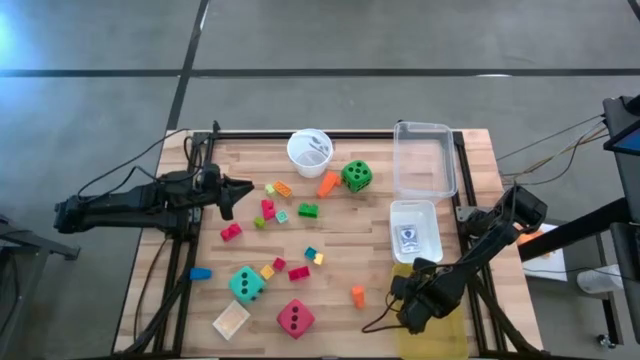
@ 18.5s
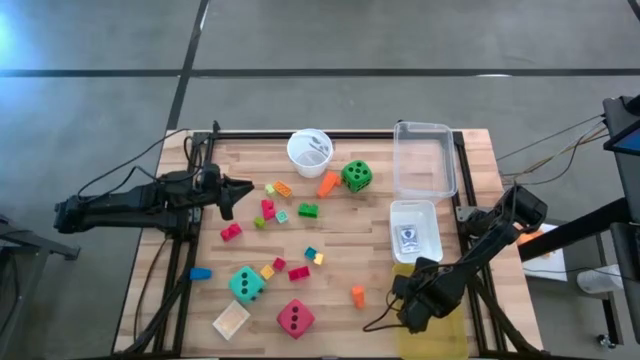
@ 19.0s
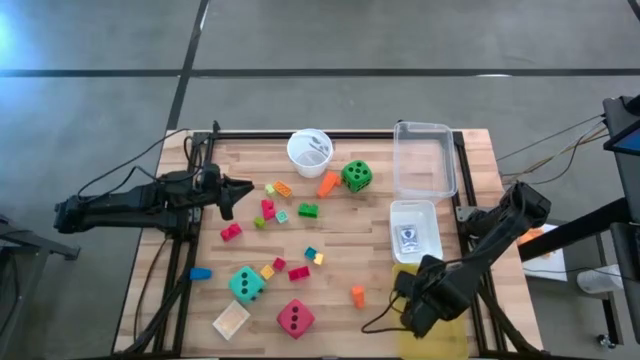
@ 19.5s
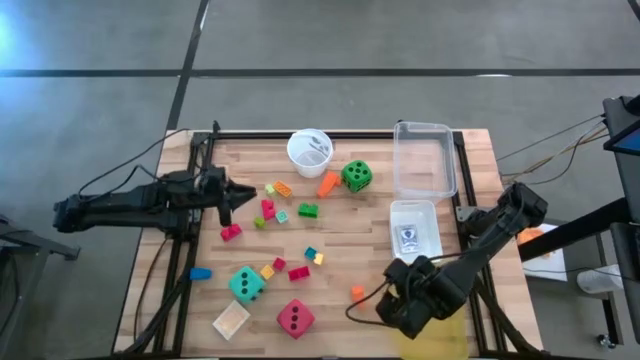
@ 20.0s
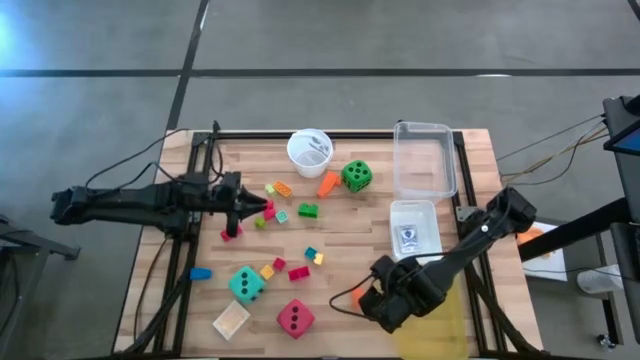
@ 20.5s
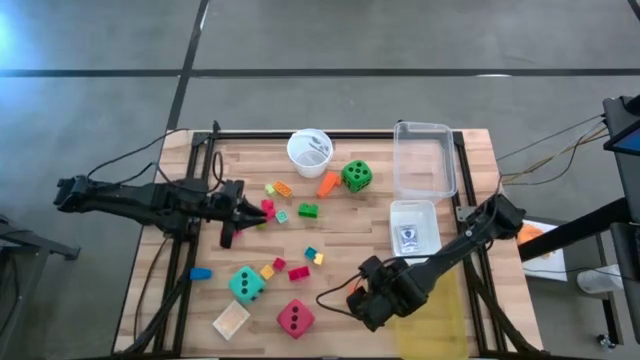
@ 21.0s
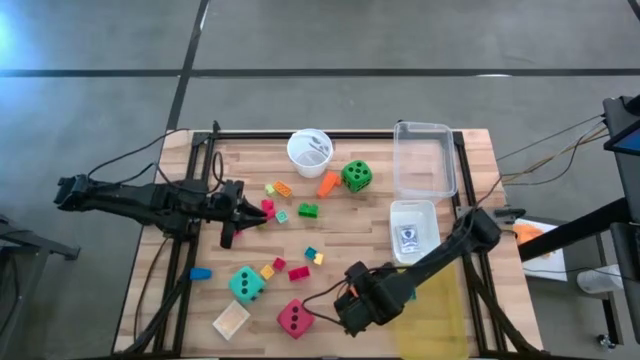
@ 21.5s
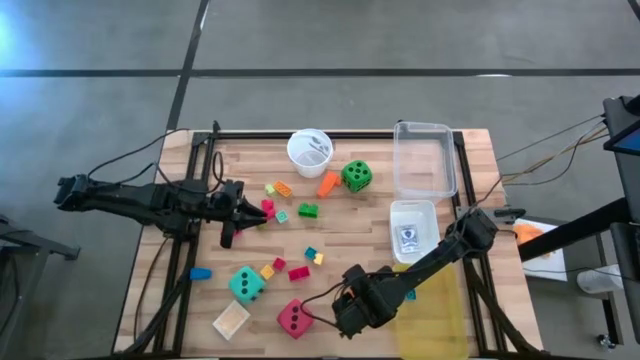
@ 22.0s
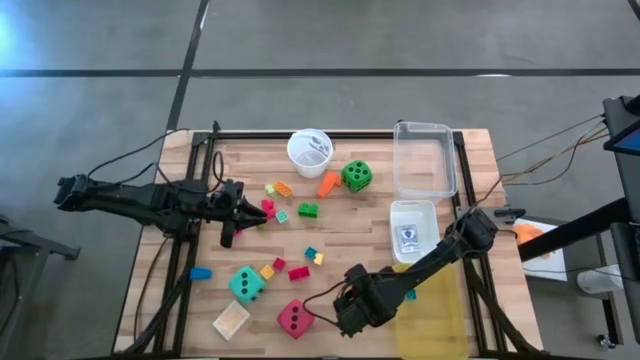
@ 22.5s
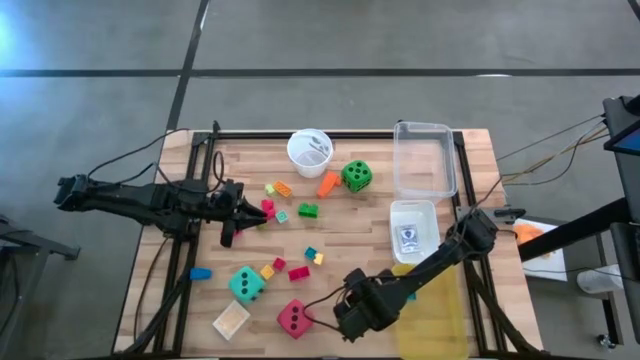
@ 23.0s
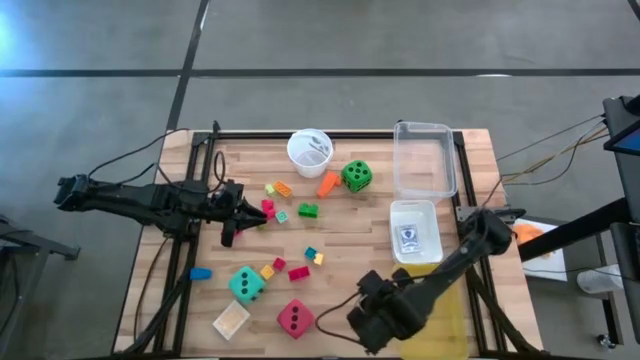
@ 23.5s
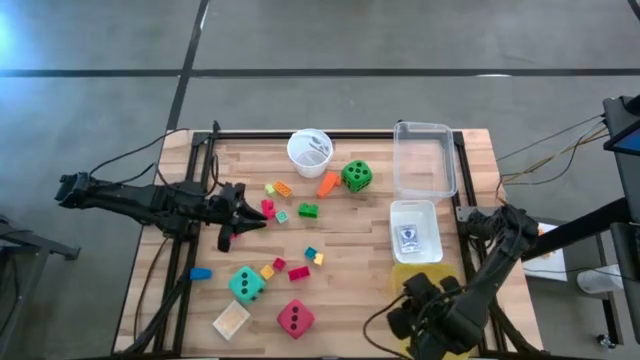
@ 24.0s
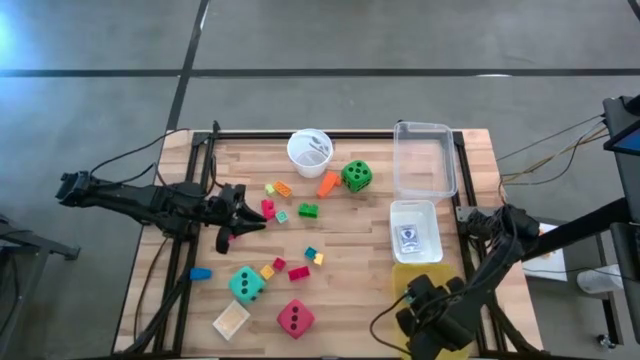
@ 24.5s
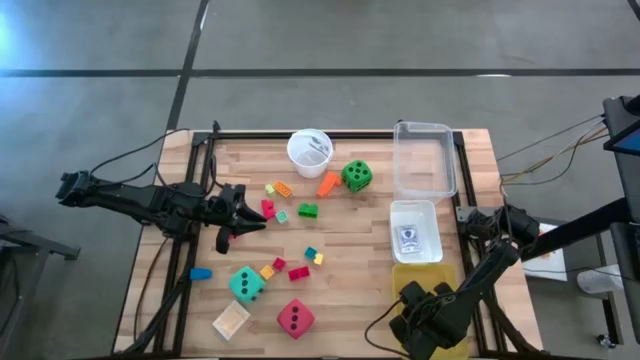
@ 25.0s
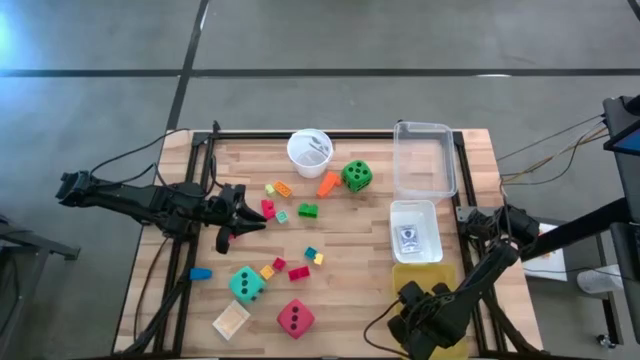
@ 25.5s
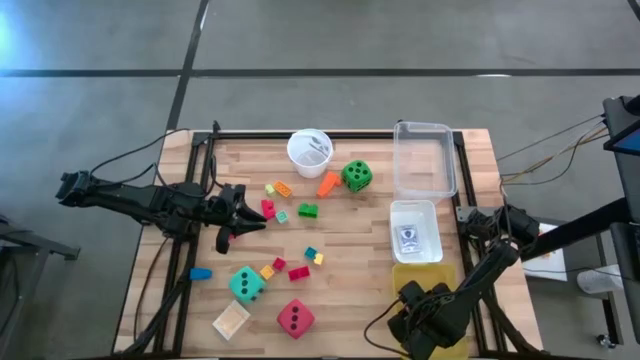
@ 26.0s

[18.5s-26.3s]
Task: Pick & Place Toys
Put the orange game piece into the yellow bin

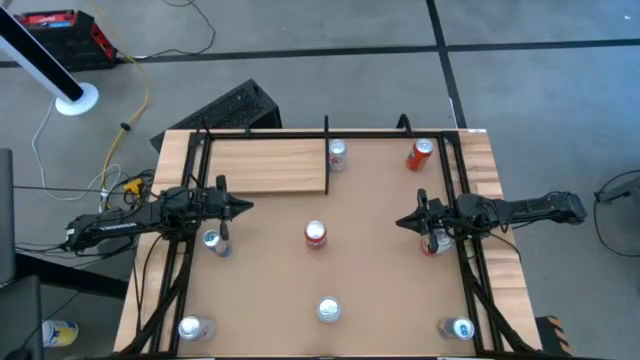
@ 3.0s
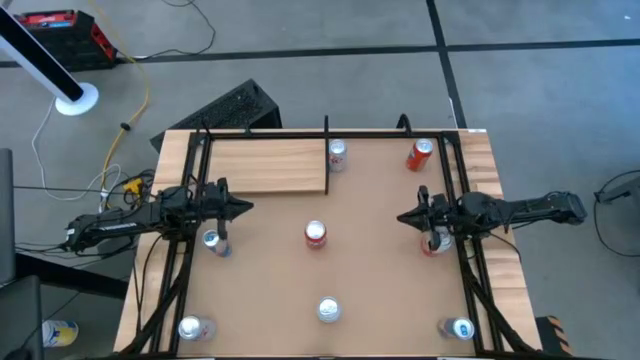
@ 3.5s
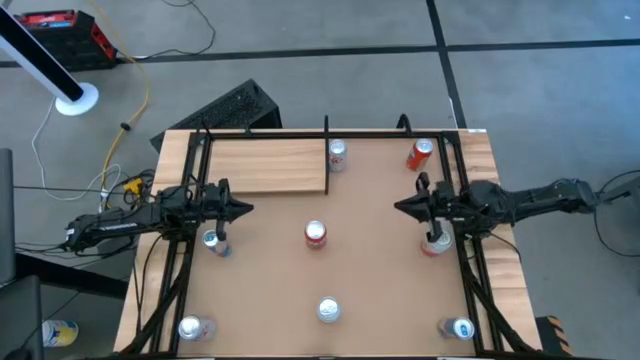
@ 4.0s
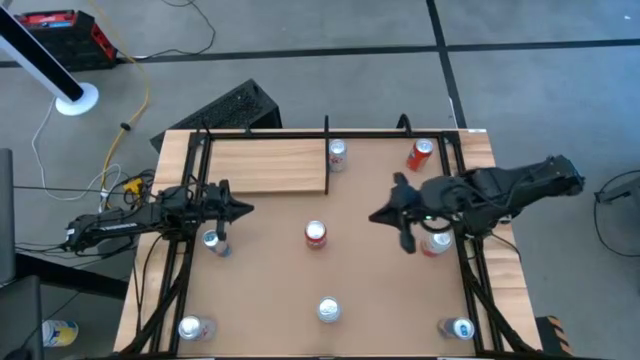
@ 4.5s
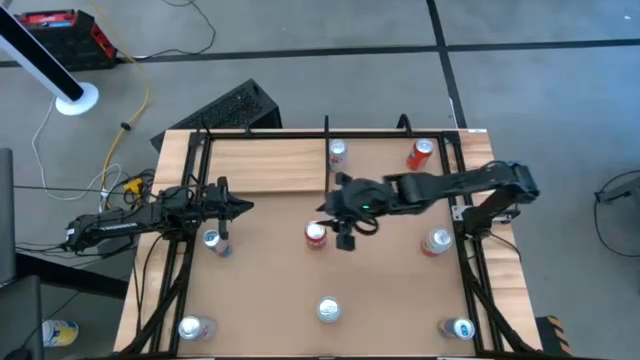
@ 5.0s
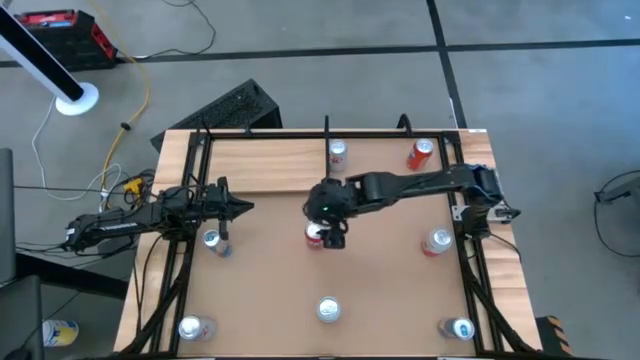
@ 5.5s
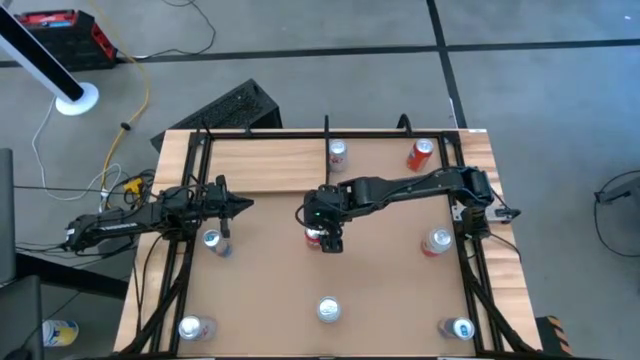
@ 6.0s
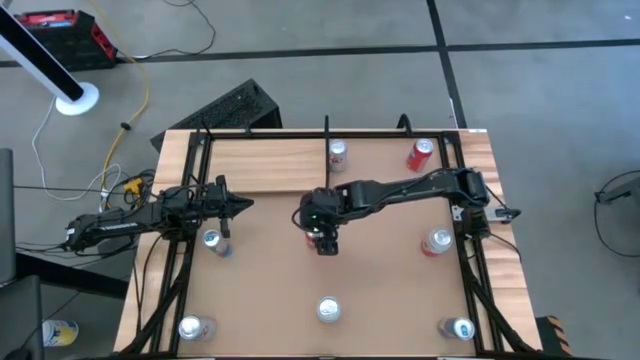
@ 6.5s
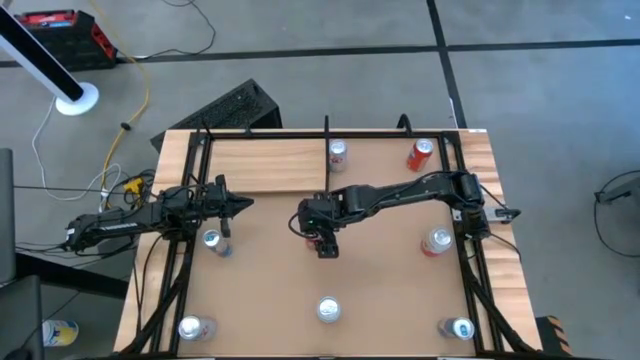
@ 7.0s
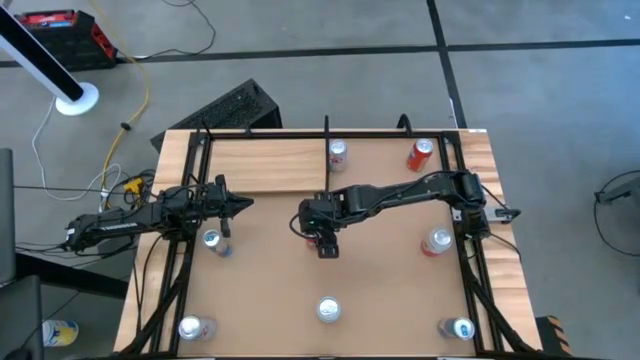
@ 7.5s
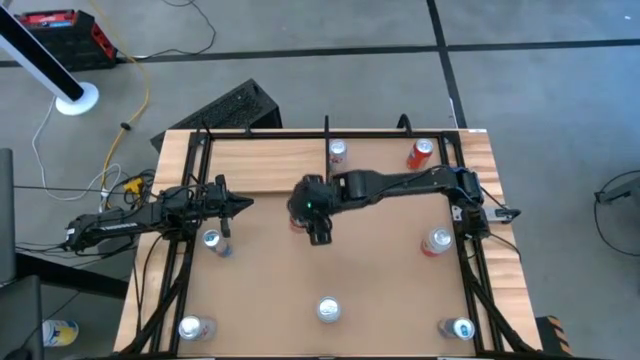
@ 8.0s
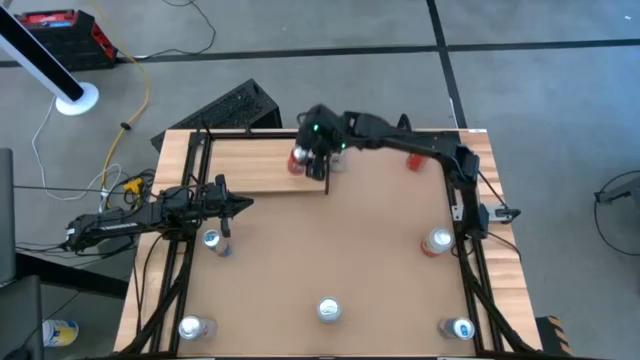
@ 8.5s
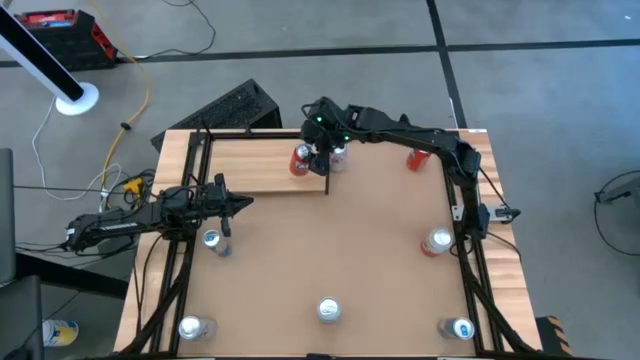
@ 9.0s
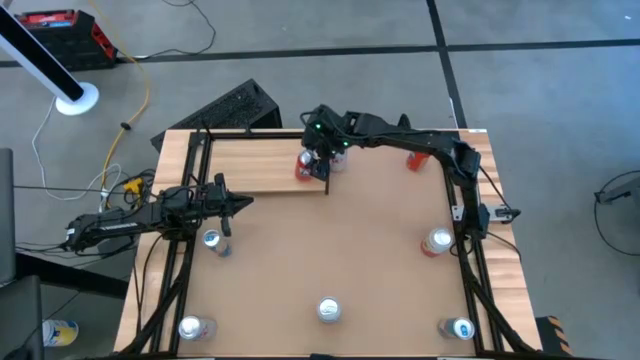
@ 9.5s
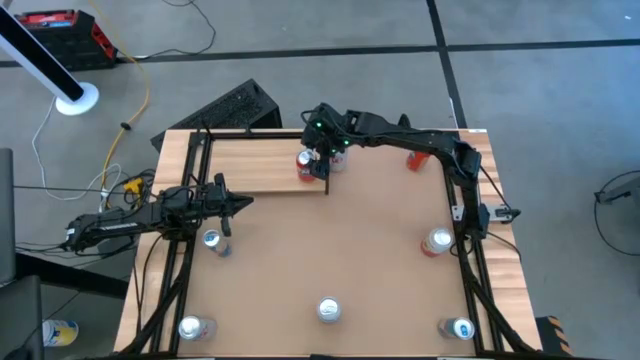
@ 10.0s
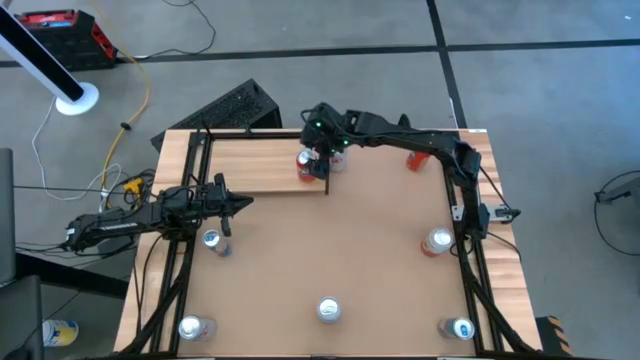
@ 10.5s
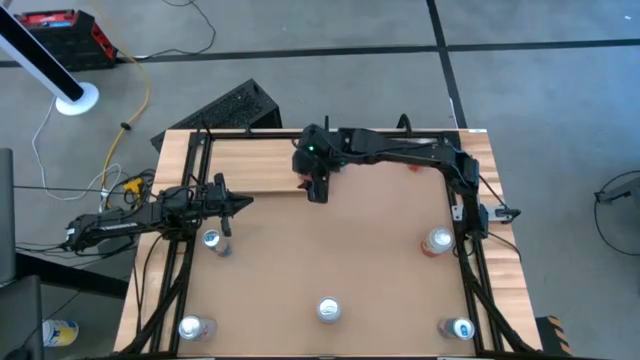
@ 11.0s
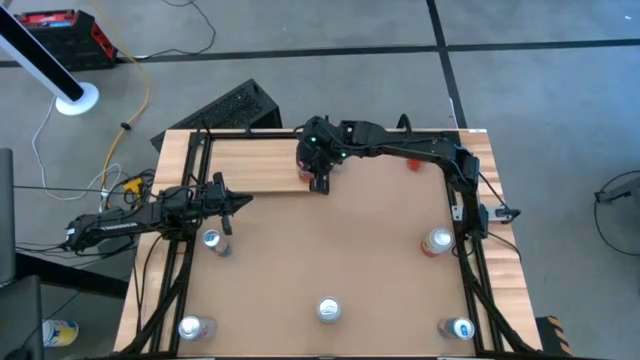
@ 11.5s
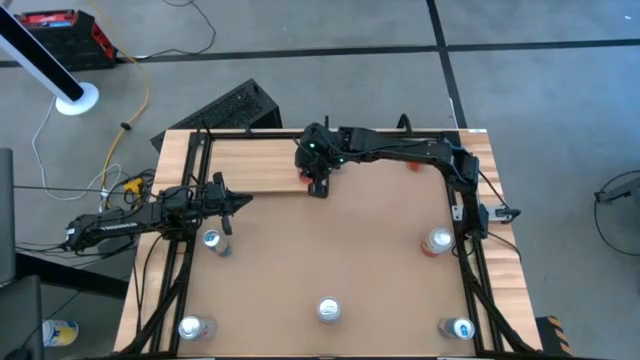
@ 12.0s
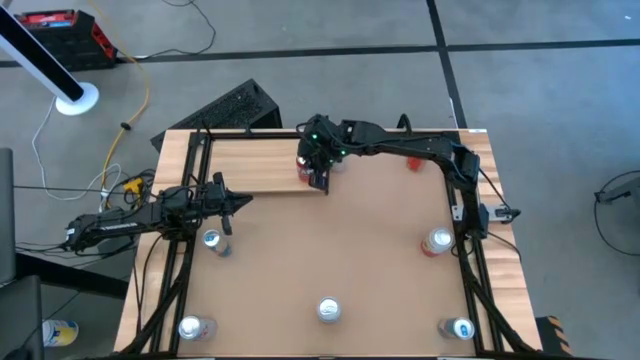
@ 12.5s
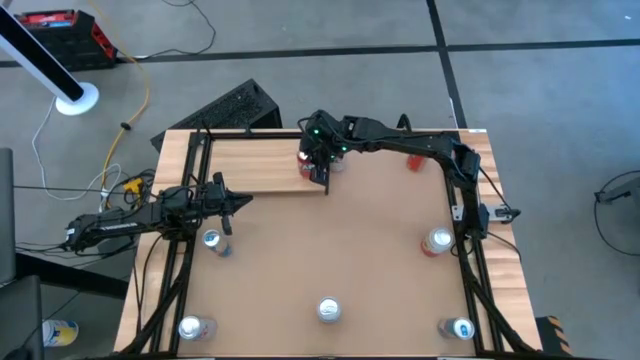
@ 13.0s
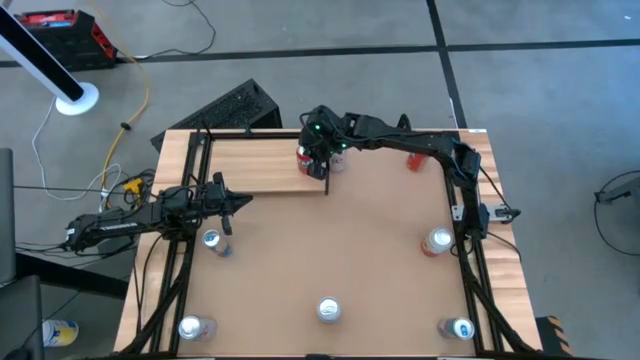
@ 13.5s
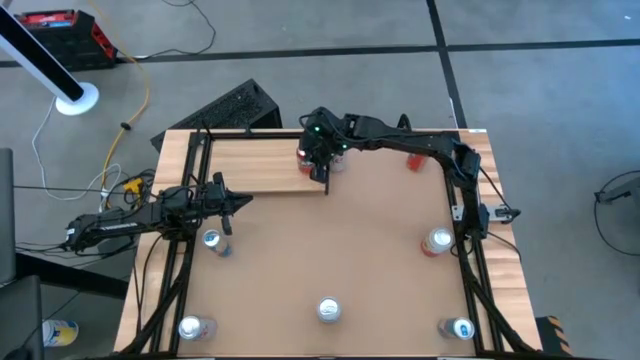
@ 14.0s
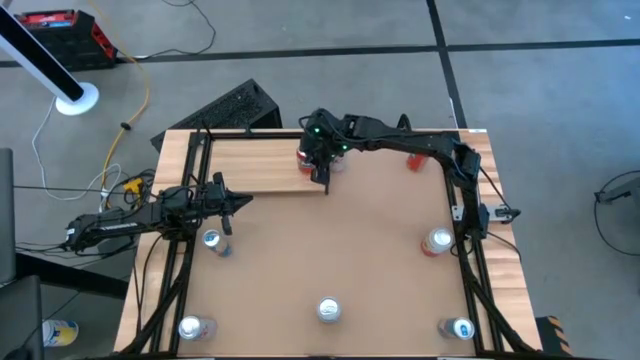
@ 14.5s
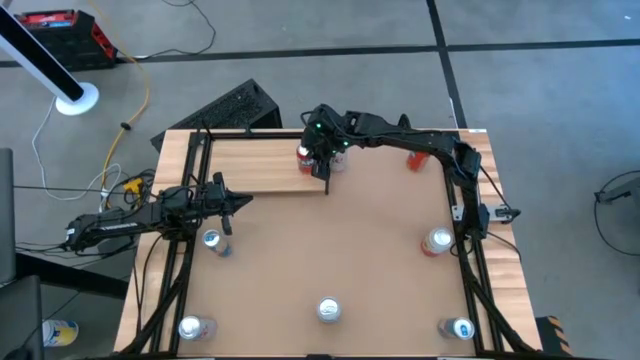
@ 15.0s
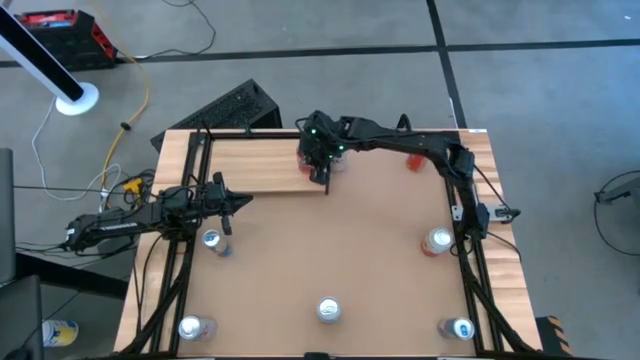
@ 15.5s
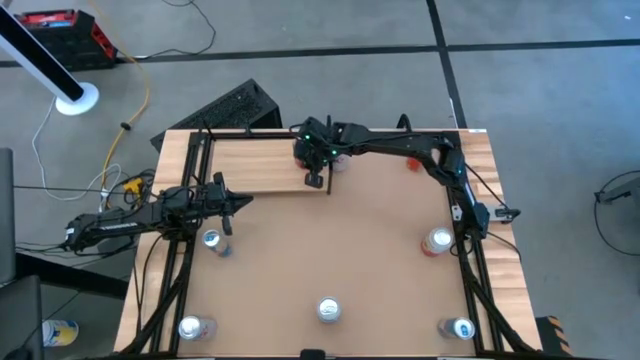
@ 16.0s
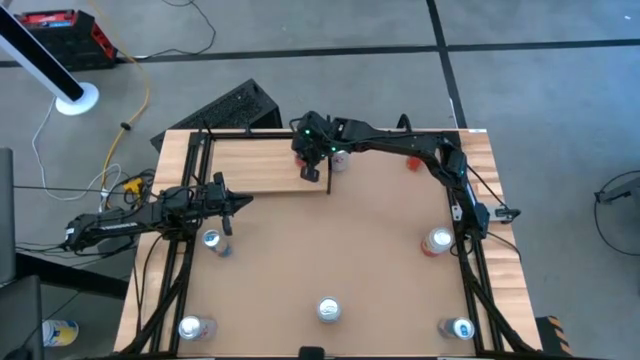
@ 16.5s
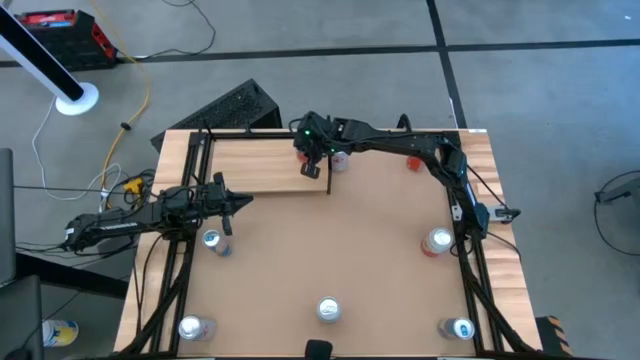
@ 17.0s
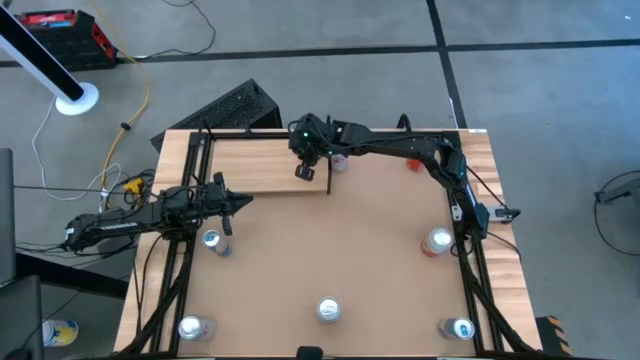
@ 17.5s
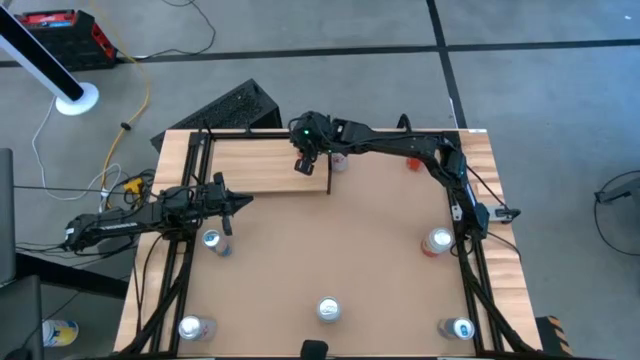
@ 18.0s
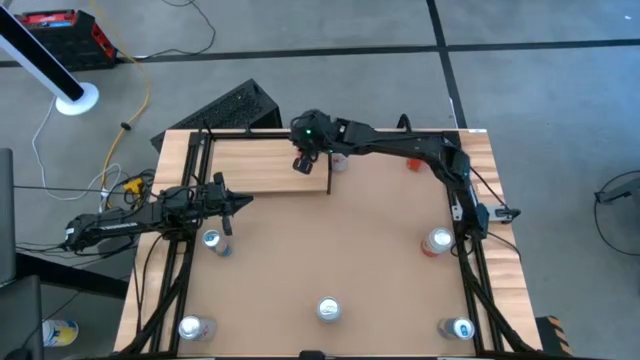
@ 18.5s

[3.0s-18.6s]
Task: Place canned beverage on shelf
Put the bottom red soda can on the shelf
